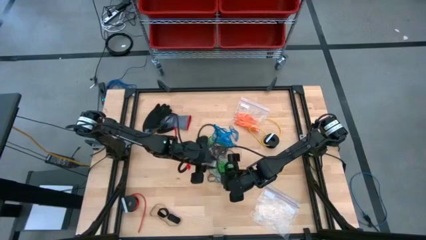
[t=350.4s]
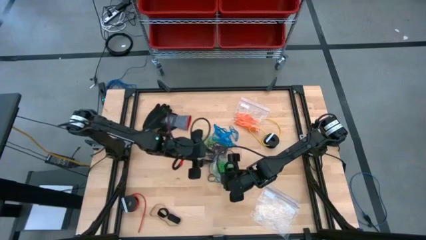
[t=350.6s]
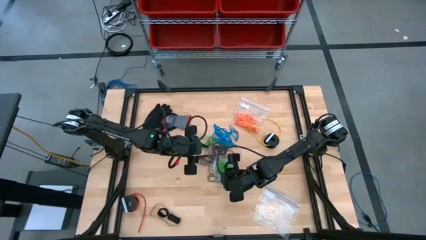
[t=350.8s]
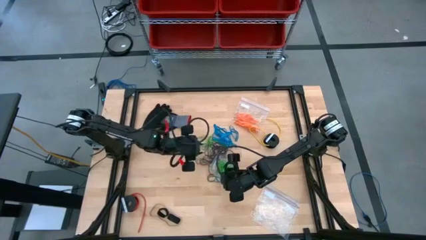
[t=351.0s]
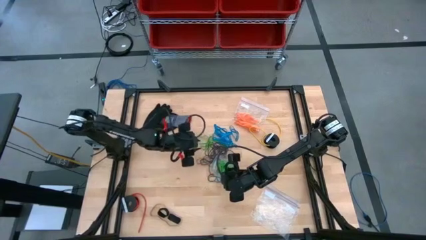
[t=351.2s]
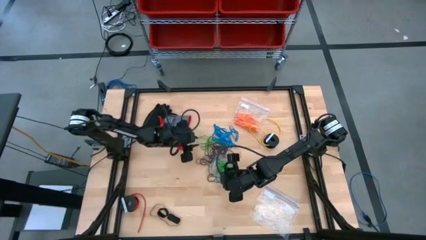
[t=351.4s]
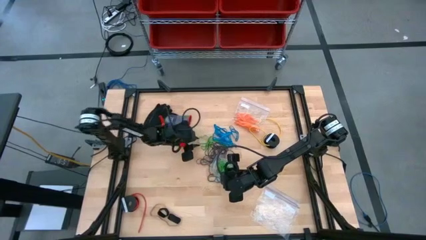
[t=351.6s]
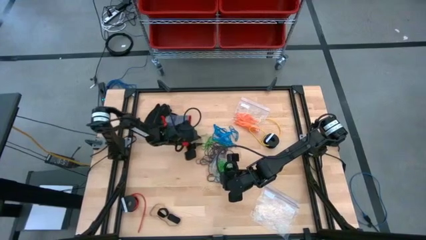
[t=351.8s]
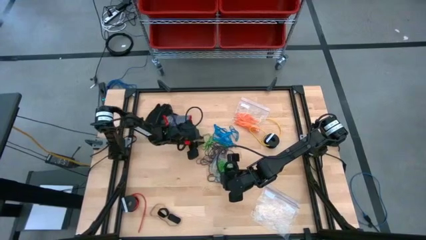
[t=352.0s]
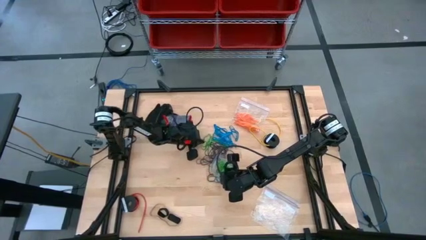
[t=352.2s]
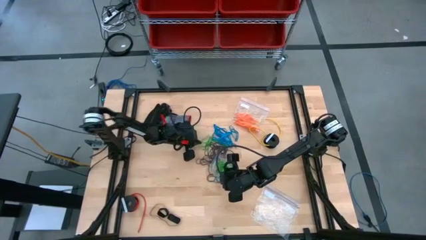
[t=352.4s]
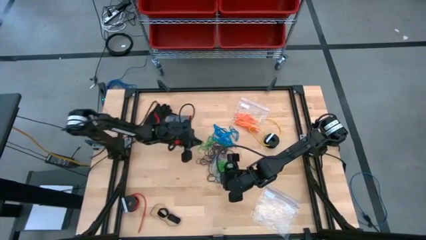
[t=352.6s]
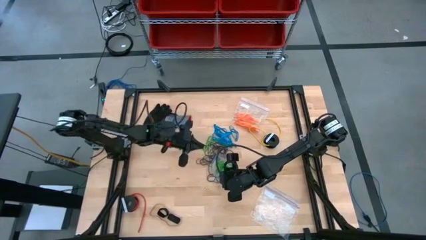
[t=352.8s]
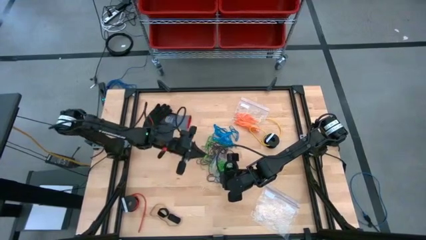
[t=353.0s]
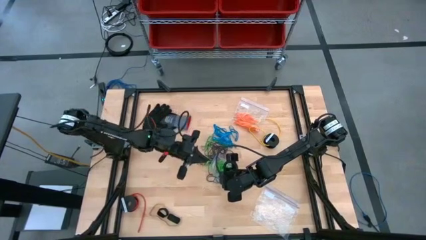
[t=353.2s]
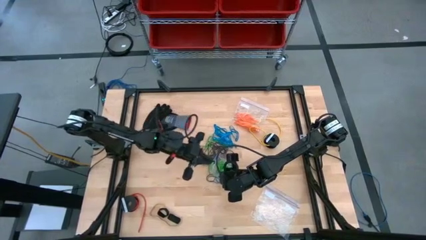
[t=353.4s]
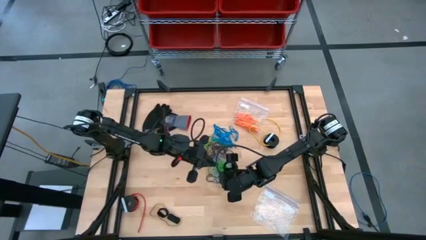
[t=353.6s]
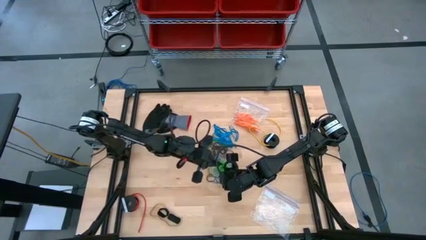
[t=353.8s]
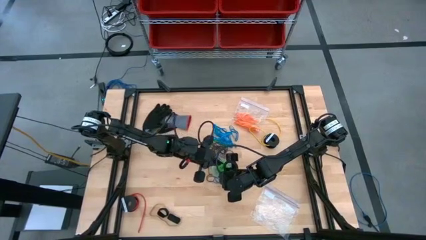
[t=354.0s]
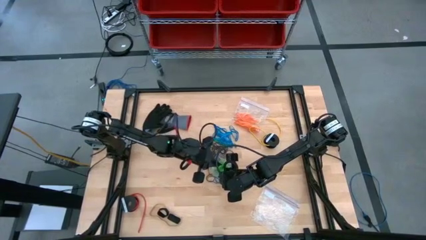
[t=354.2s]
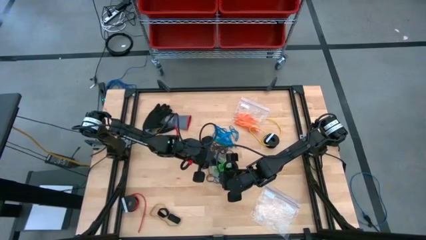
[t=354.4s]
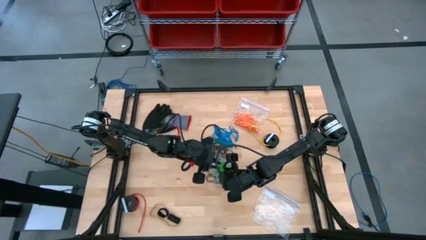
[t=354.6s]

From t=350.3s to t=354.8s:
Task: Sort rubber bands
Put the green rubber band into the transparent zip bag

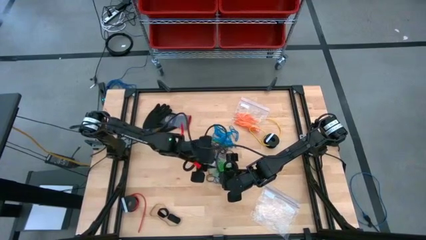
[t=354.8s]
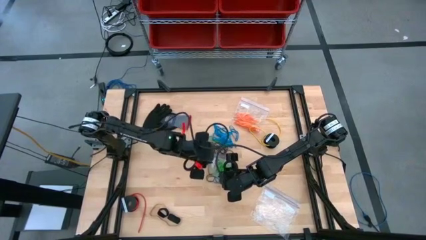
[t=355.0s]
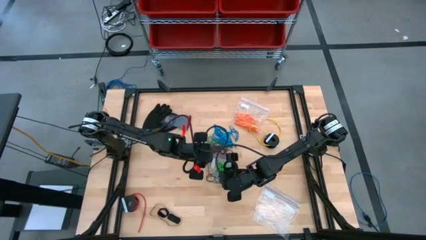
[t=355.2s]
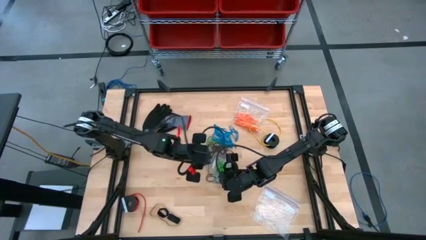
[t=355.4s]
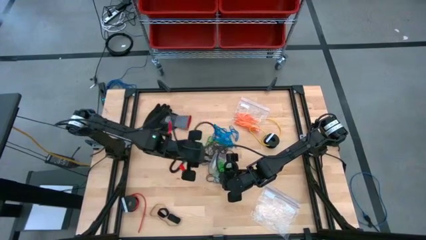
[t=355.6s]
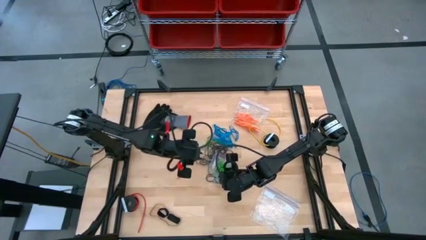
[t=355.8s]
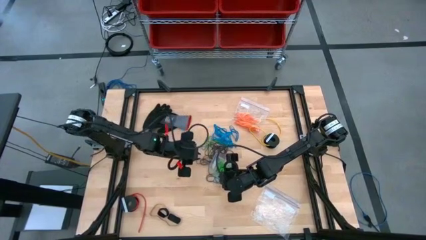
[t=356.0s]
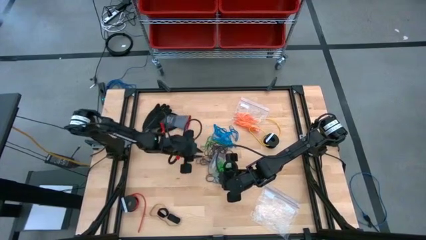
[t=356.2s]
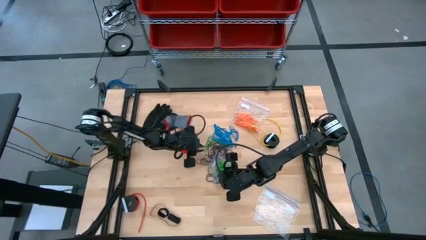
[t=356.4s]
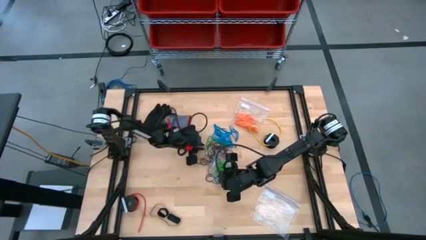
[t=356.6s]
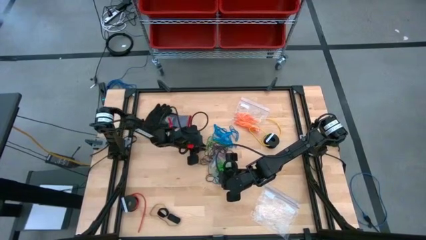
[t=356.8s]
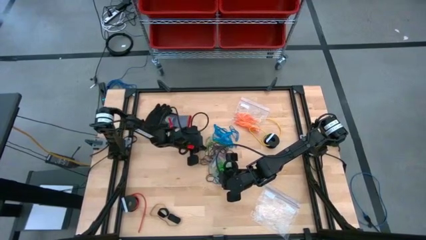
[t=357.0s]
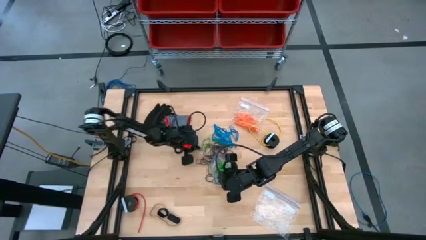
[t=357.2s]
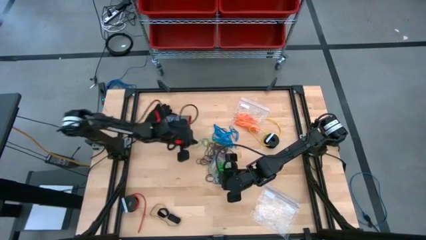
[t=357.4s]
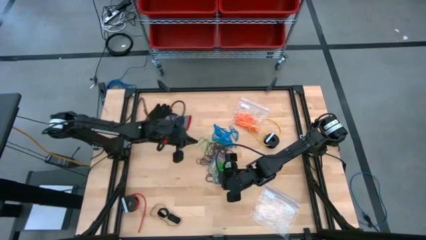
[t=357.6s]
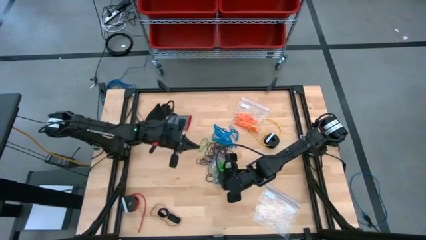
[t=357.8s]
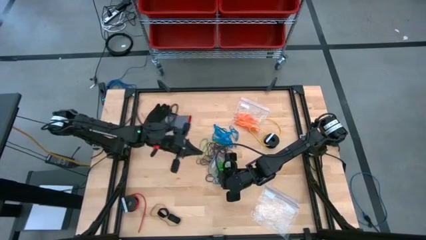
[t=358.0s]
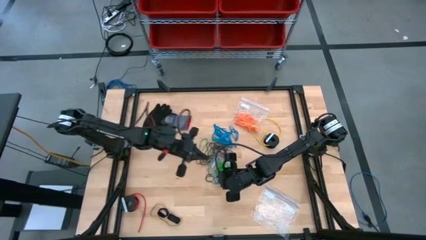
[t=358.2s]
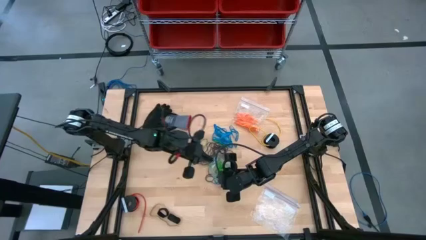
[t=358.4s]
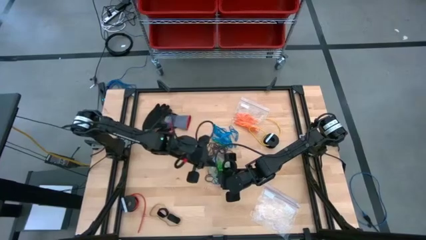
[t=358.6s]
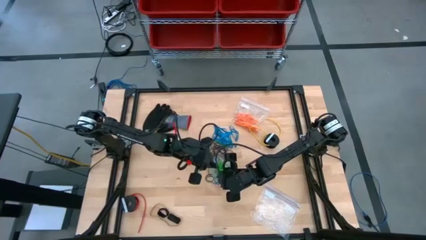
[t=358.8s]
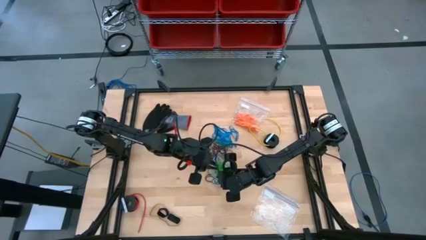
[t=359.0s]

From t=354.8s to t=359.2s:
Put the green rubber band into the transparent zip bag

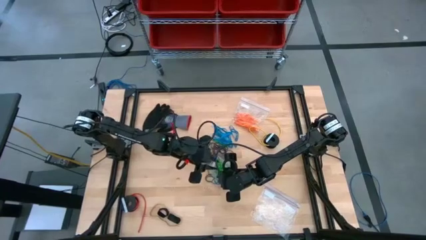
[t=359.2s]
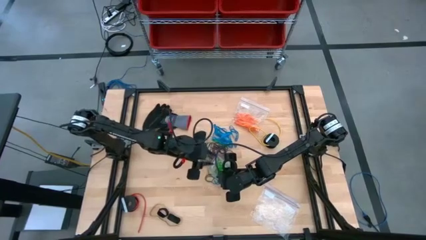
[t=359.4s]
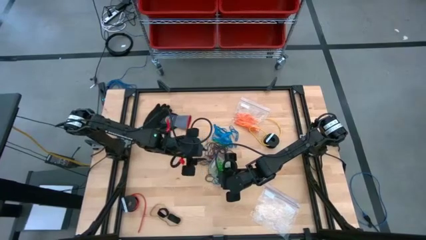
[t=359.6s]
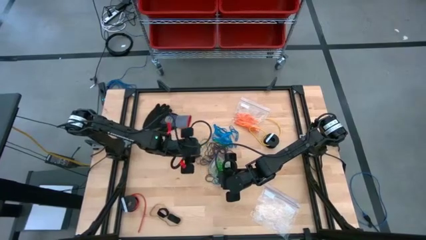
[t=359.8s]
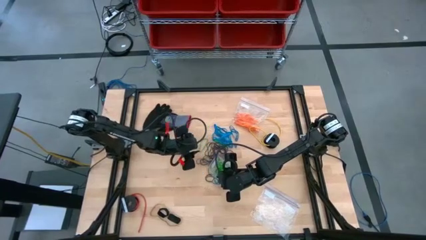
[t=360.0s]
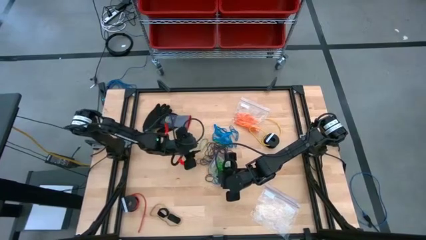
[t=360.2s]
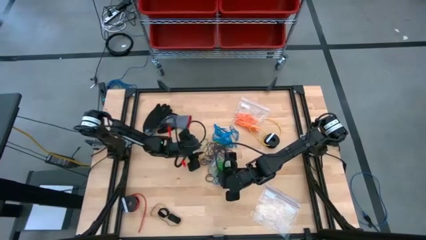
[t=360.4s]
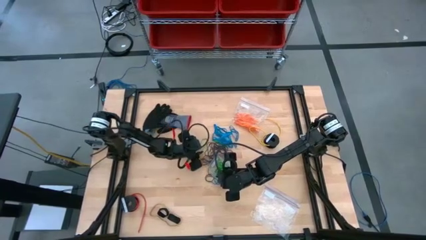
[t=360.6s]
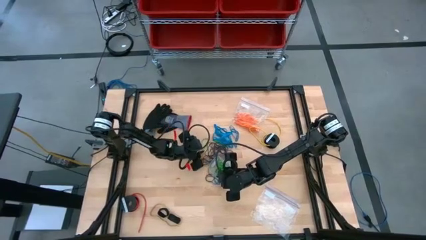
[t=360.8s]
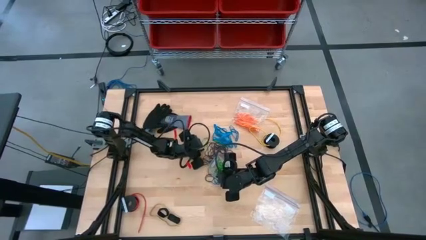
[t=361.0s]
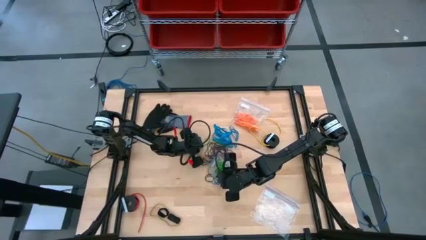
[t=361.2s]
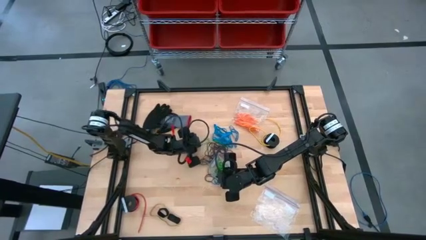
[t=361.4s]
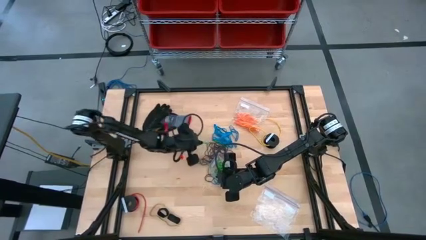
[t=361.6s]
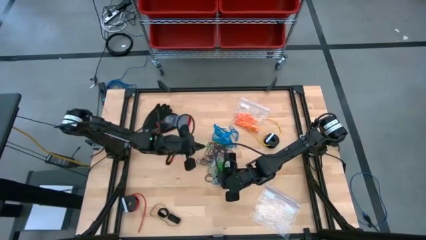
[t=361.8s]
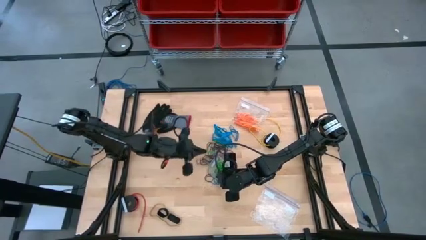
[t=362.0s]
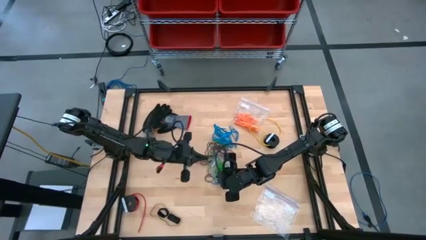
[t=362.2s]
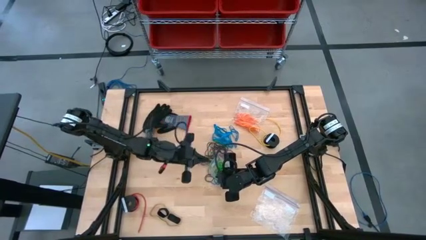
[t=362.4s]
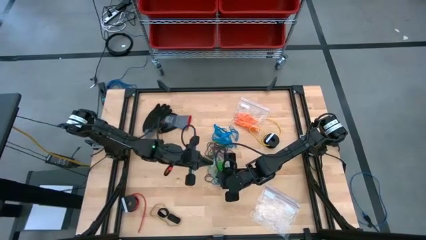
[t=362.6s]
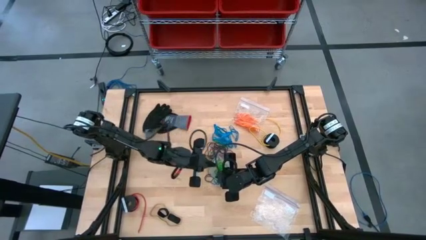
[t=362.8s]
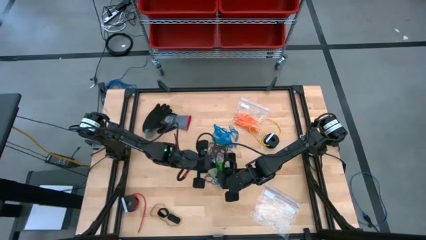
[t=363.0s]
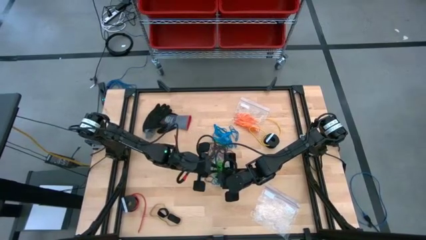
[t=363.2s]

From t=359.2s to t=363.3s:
Put the green rubber band into the transparent zip bag

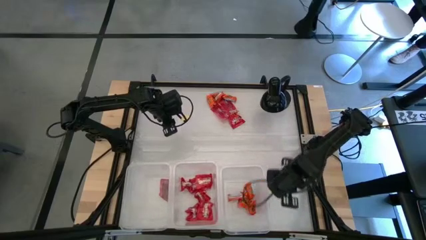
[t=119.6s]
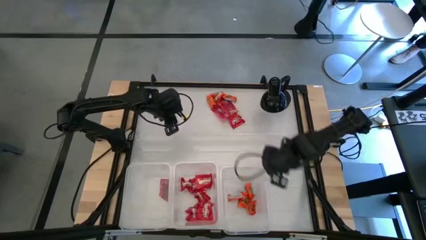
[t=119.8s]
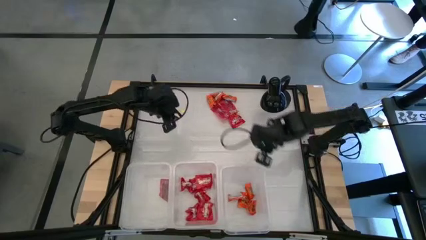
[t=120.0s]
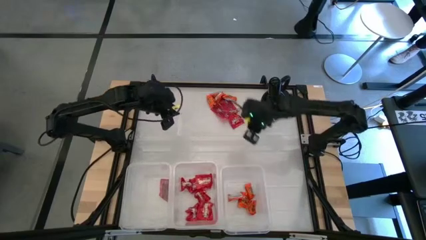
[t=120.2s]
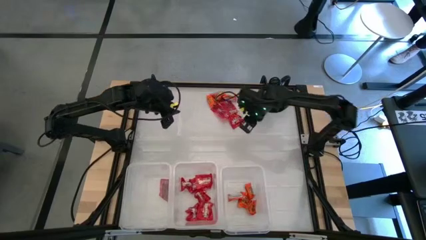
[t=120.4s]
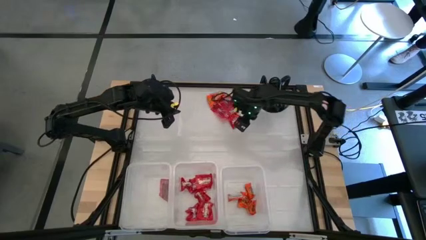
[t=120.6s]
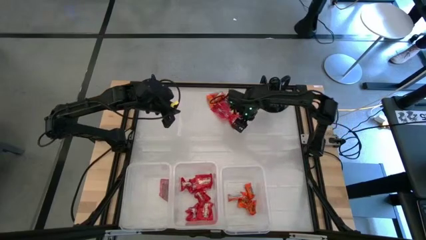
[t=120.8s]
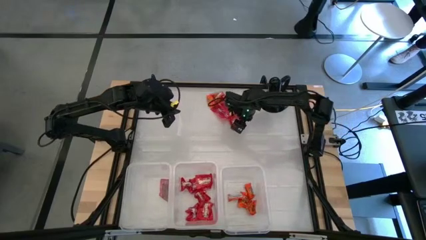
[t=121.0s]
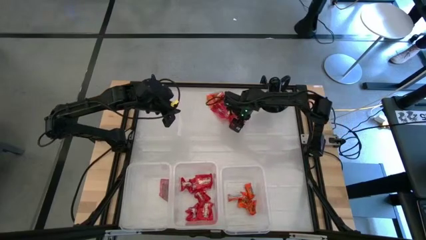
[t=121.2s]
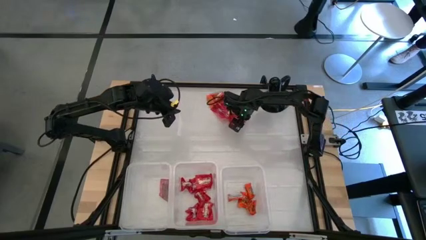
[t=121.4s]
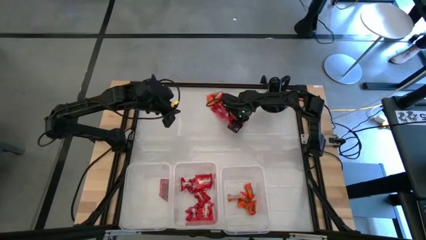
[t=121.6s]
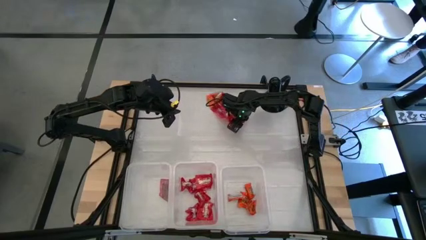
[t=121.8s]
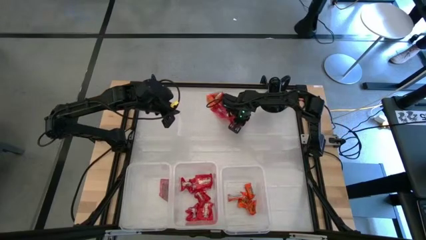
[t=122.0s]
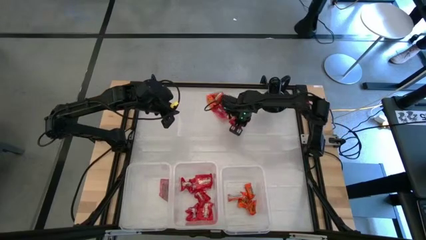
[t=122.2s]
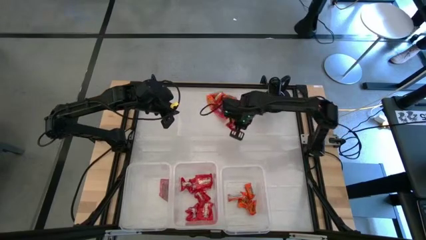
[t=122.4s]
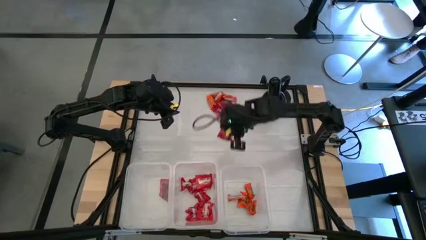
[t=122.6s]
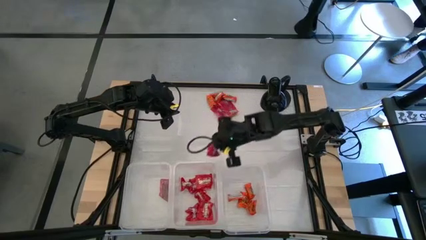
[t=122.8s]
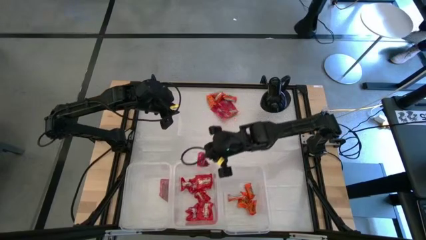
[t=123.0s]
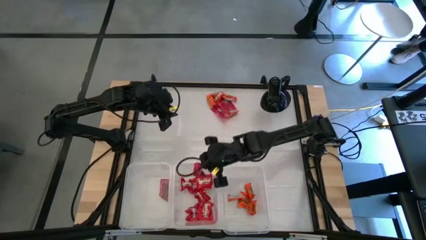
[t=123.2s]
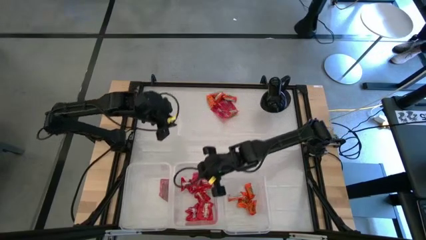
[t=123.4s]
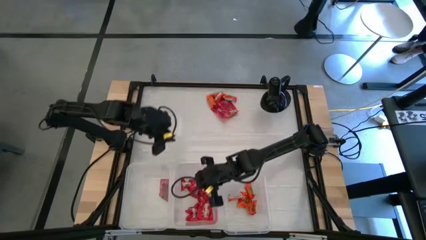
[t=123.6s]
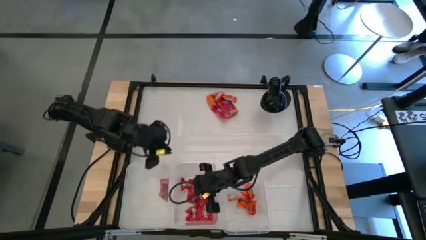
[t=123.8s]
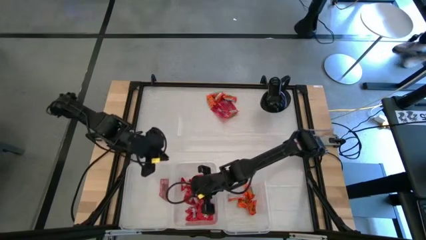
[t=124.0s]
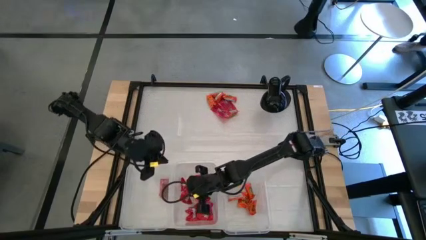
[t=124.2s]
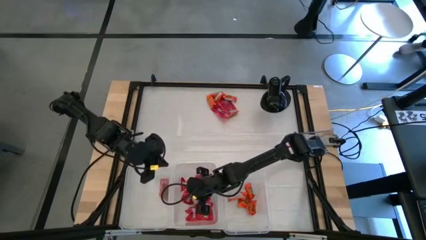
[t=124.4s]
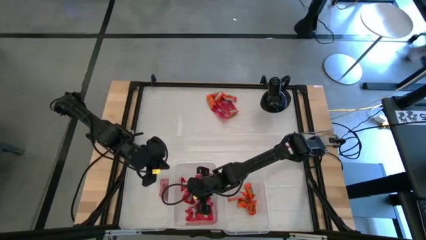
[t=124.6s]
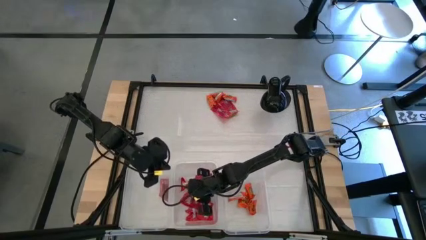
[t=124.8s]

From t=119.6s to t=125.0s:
Task: Sort candy
Put the red candy into the middle transparent bin
